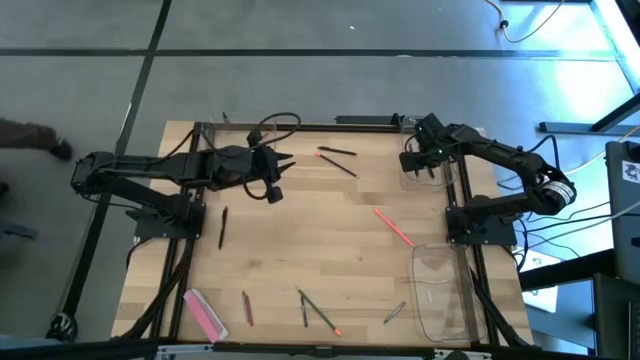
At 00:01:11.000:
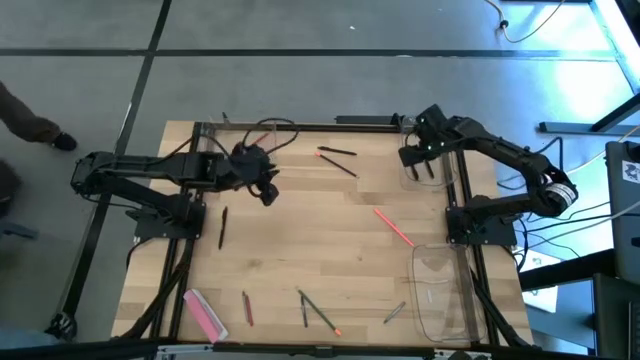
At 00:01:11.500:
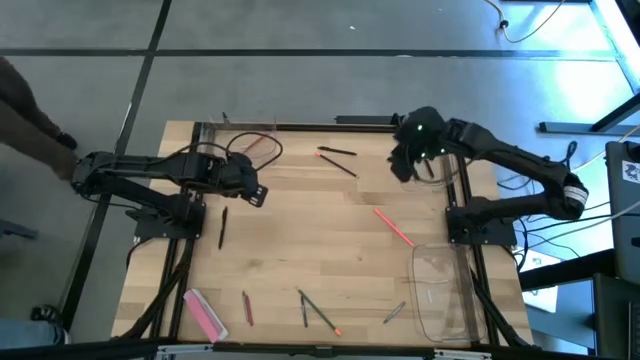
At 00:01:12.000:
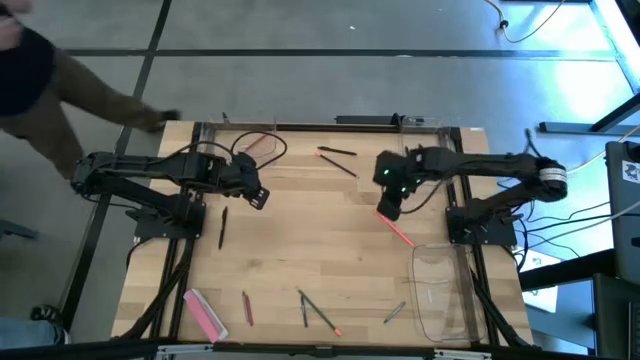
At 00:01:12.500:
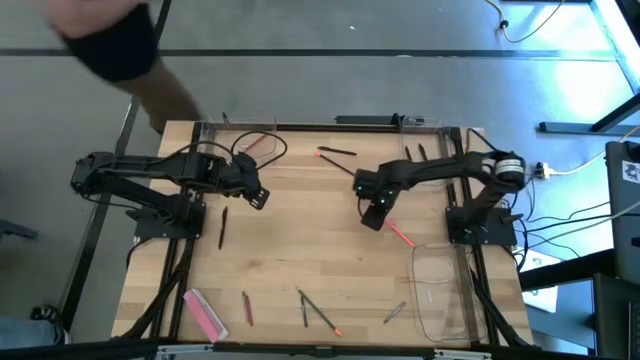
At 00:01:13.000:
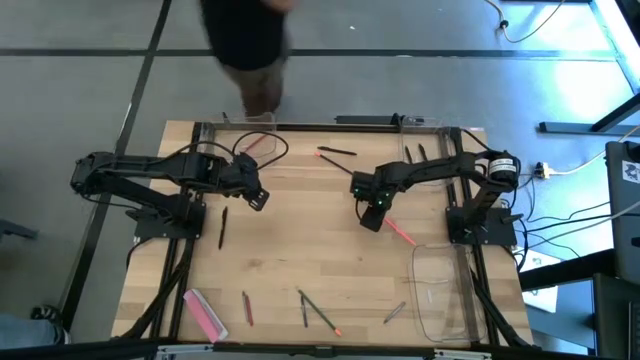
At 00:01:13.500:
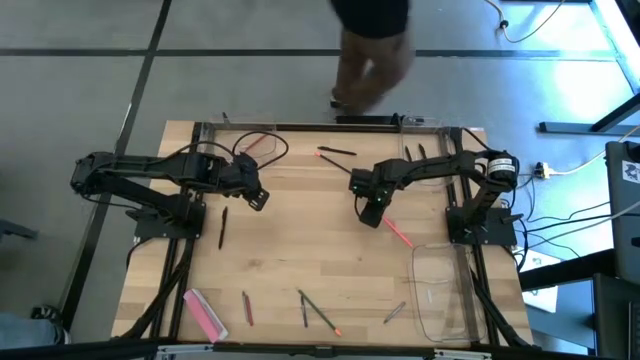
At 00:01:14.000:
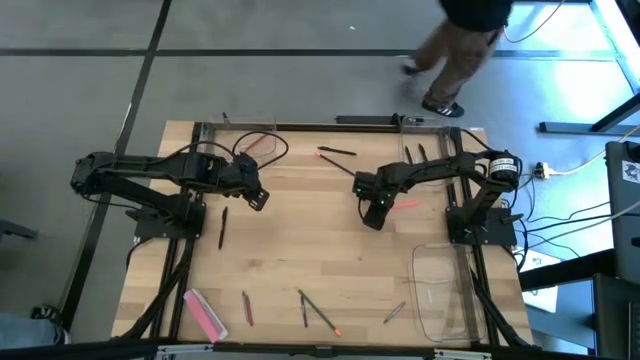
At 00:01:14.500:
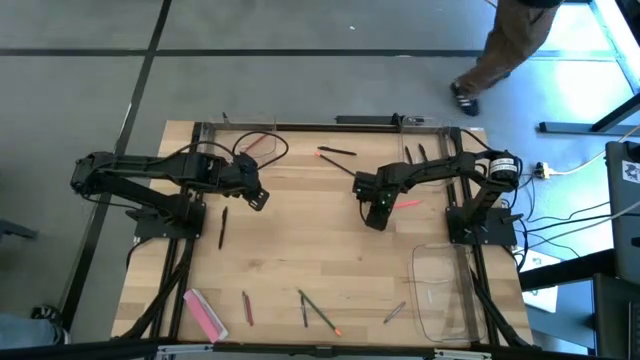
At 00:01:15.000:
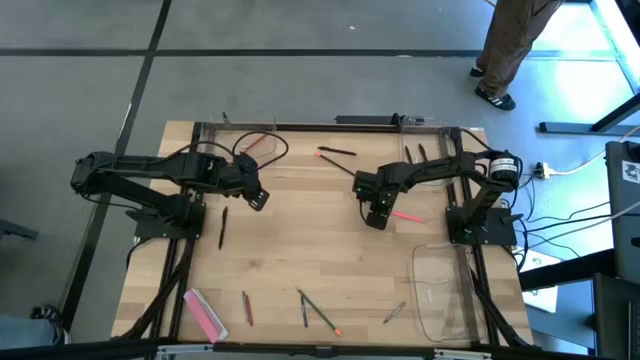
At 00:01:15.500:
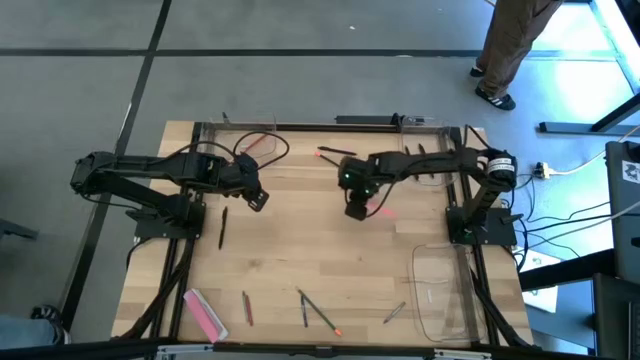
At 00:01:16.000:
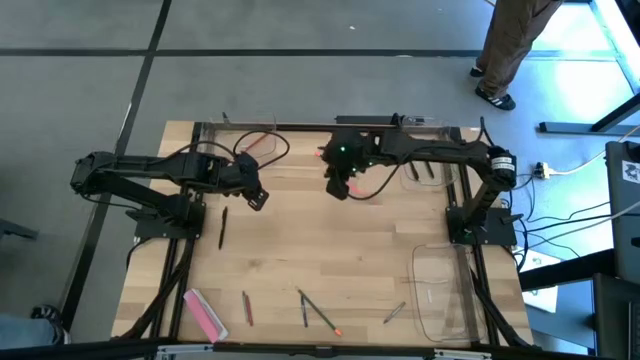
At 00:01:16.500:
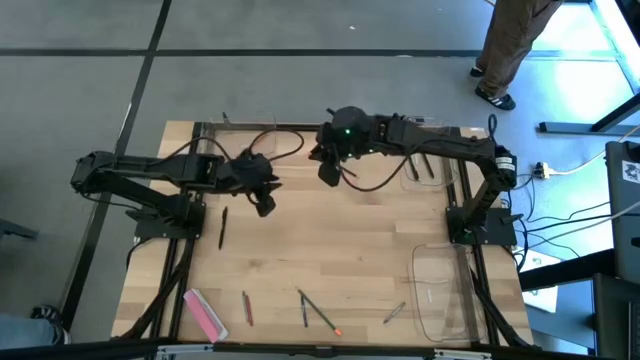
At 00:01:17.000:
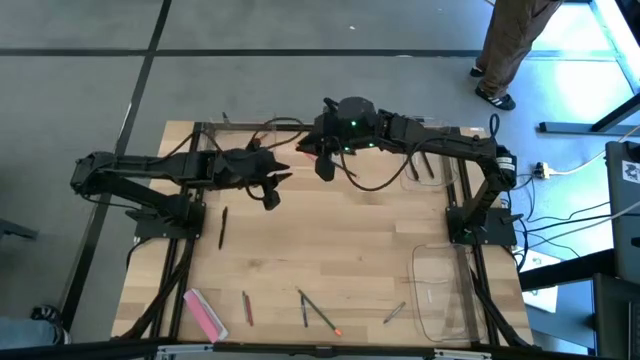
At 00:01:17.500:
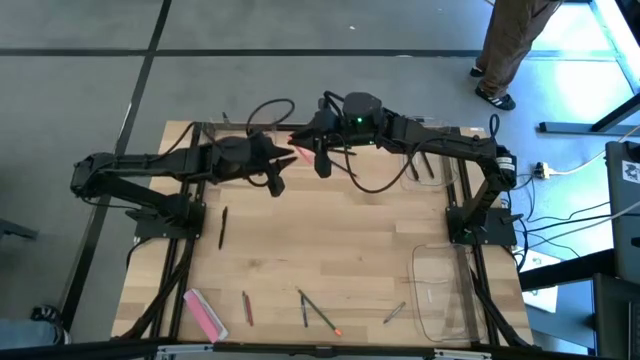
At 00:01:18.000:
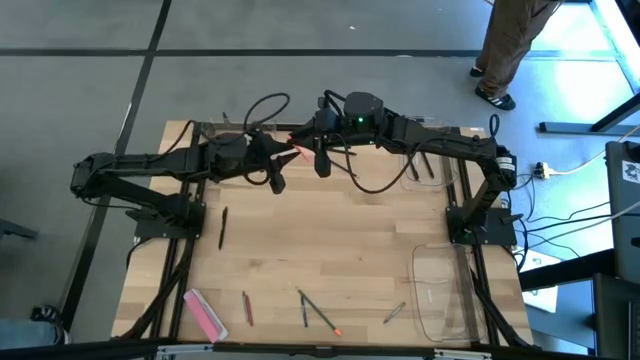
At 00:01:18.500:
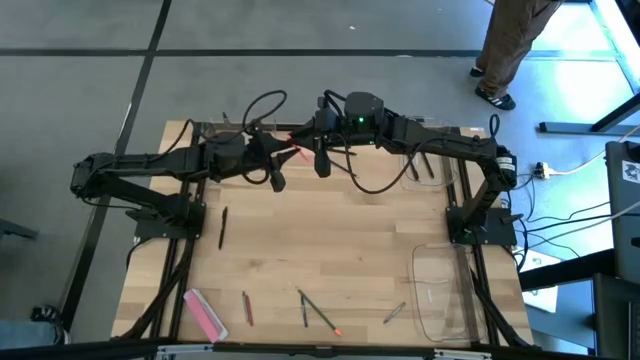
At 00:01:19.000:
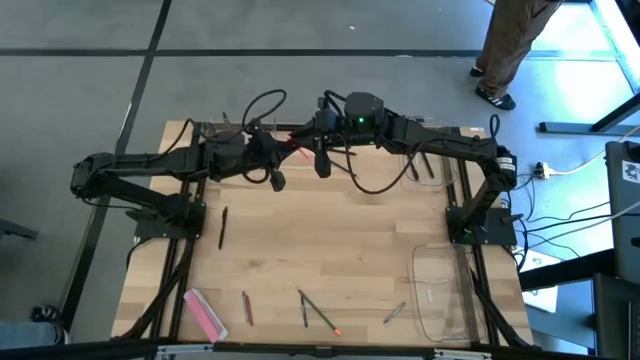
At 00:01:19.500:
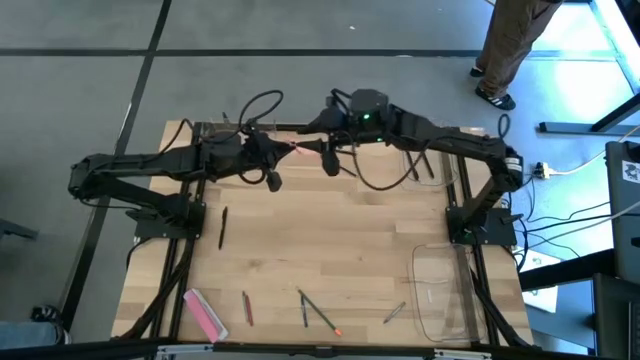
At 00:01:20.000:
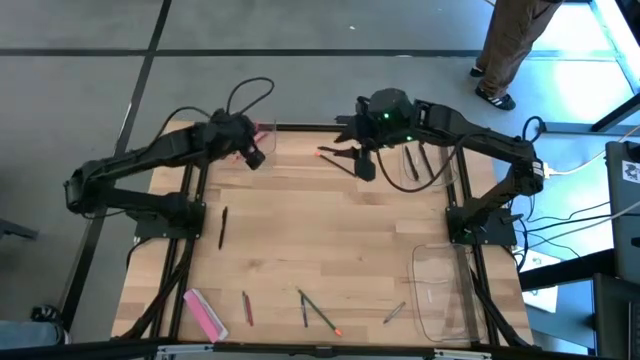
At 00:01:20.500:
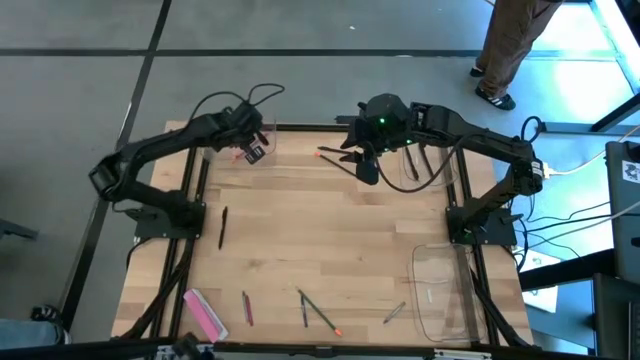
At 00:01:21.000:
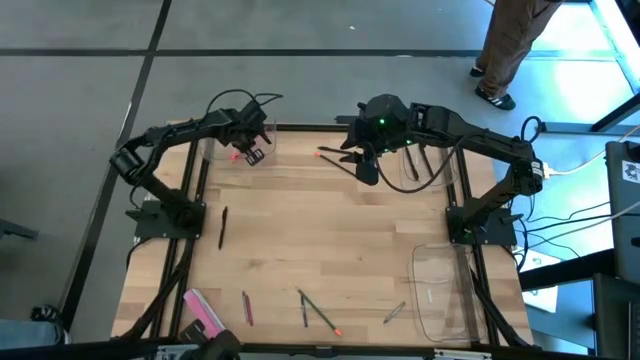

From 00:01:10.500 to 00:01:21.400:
Task: Sort crayons/erasers/pens/pencils in bins
Put the pink pencil into the top left transparent bin

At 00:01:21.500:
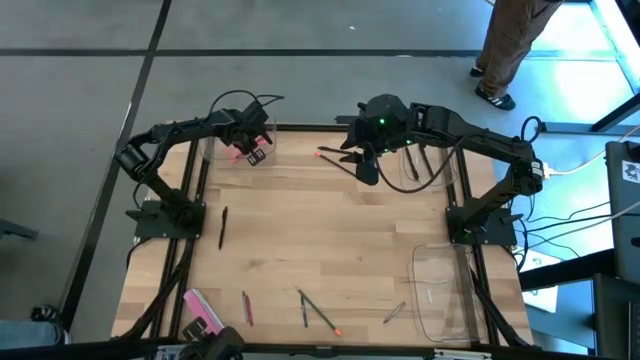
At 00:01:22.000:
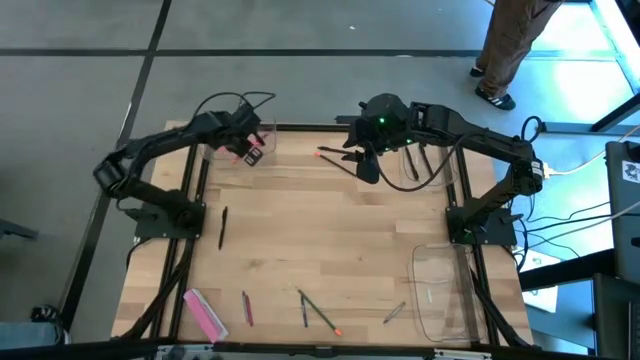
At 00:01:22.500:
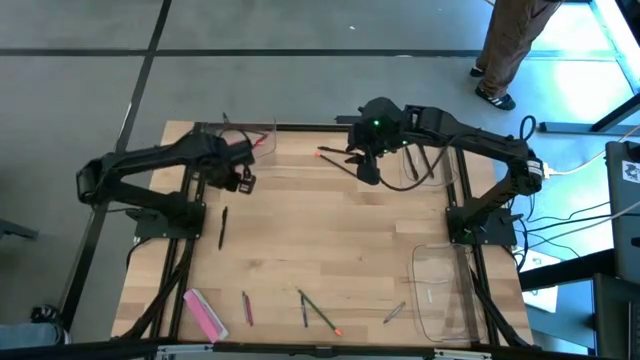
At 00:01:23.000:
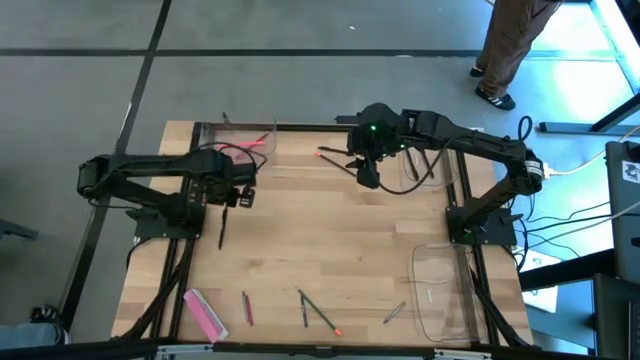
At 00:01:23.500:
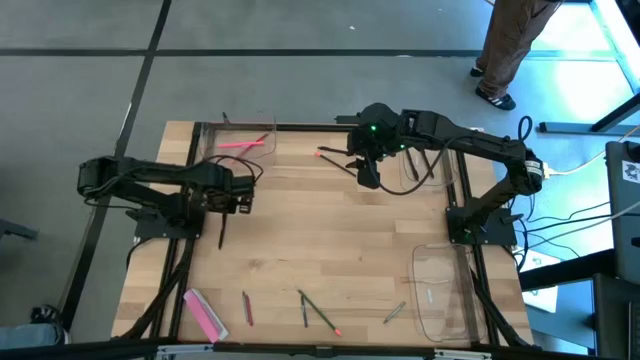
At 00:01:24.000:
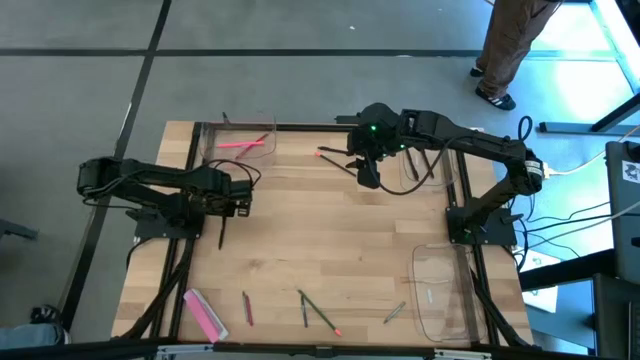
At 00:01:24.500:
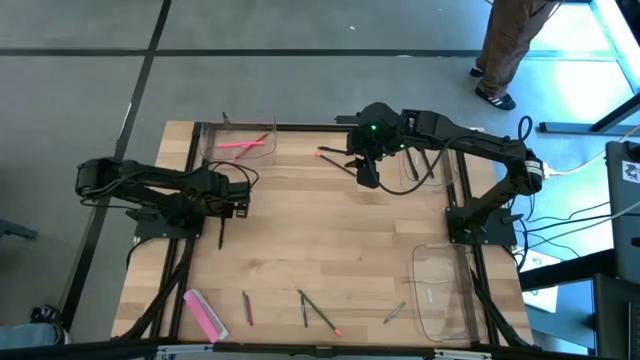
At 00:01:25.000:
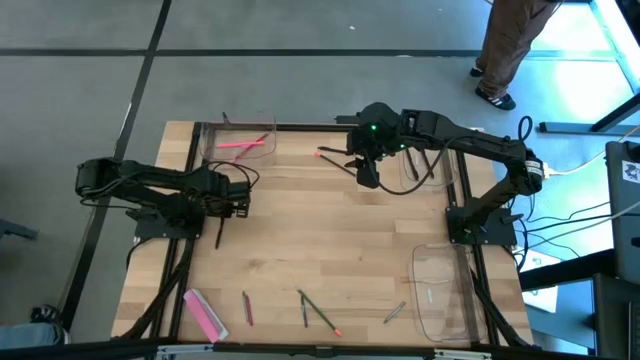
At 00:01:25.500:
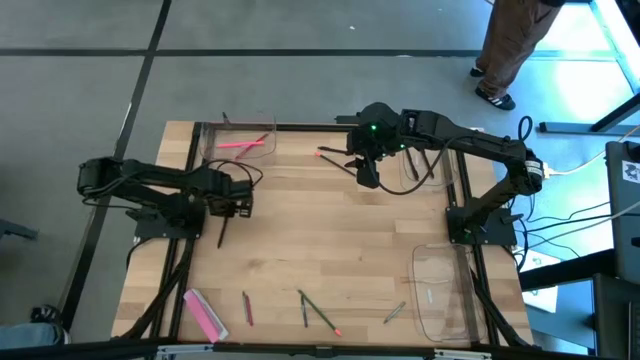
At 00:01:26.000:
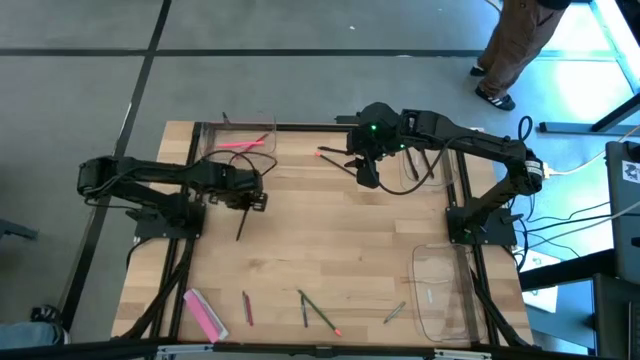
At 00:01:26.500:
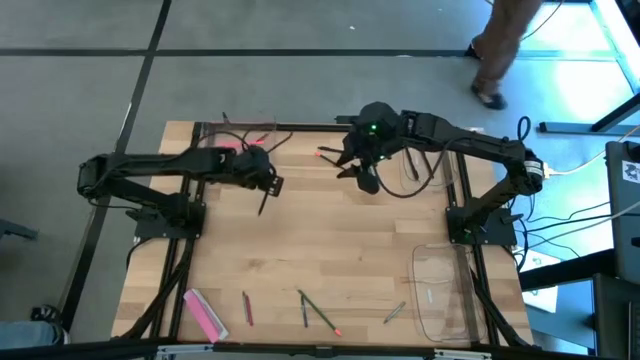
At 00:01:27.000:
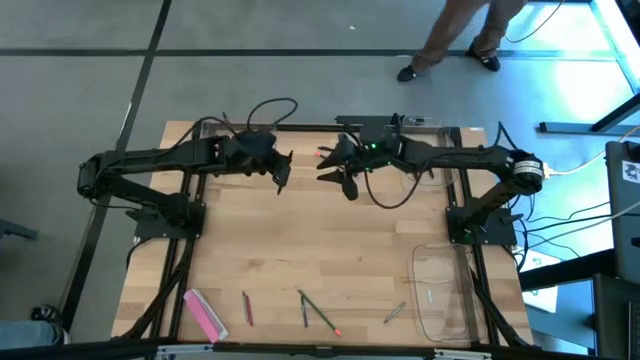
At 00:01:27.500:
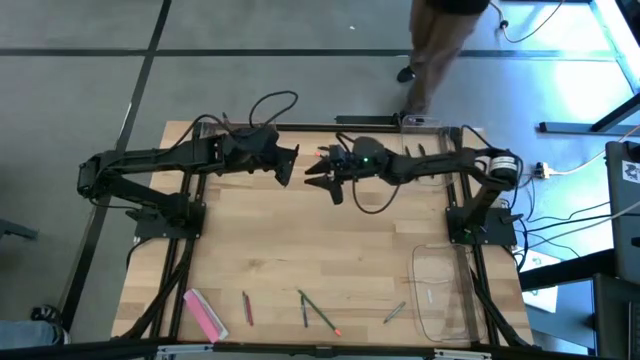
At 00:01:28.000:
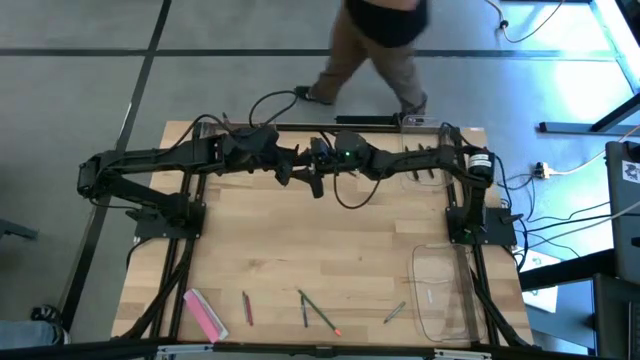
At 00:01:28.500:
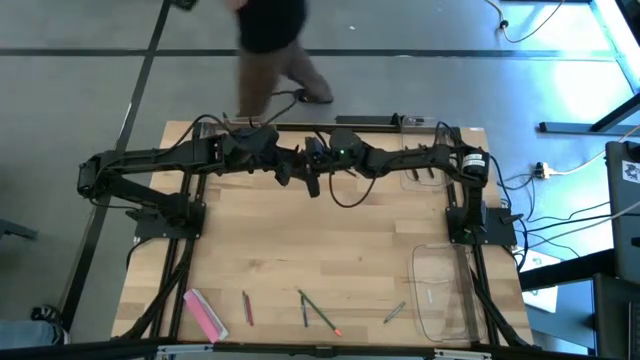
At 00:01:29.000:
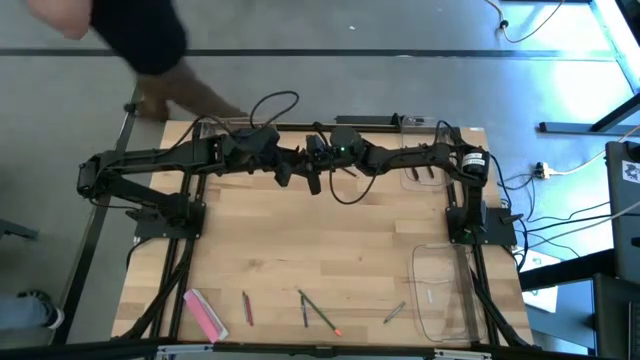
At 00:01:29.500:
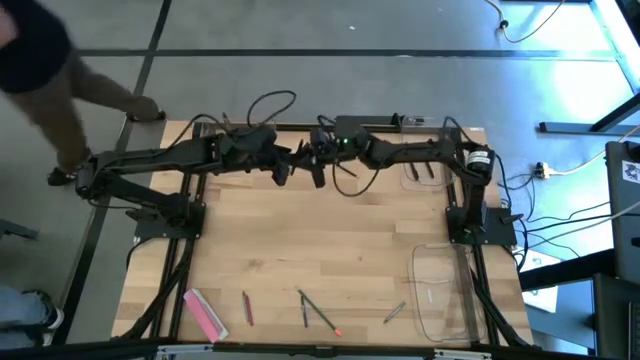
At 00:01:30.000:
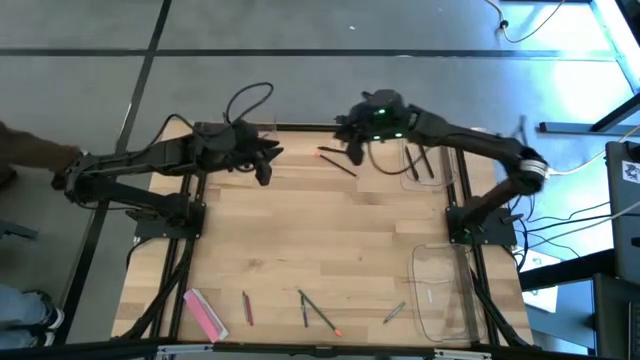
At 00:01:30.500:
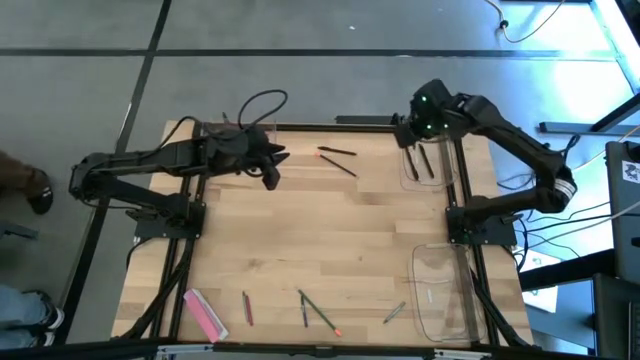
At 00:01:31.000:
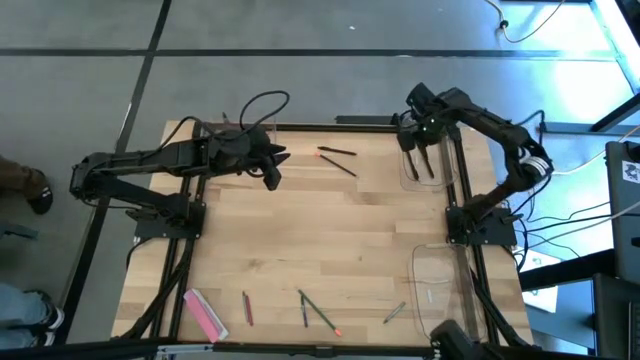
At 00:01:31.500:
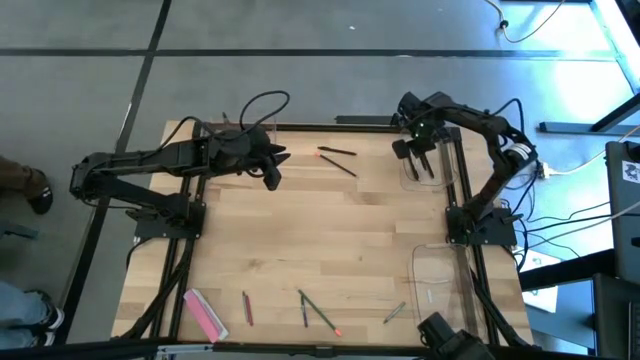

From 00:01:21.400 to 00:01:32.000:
Put the black pen into the top right transparent bin
